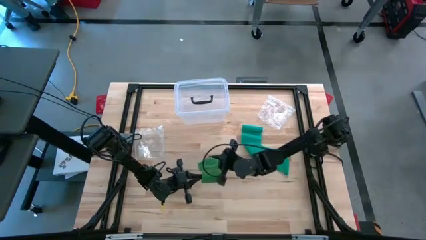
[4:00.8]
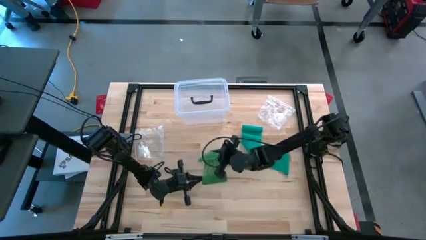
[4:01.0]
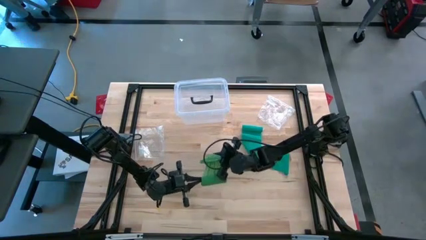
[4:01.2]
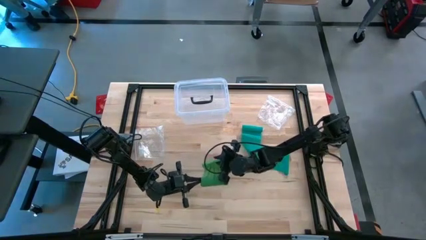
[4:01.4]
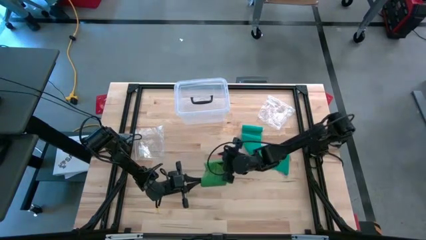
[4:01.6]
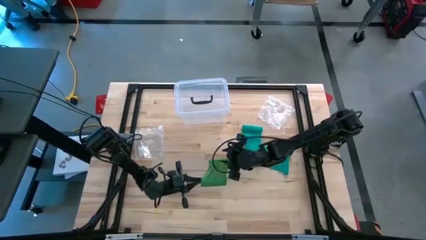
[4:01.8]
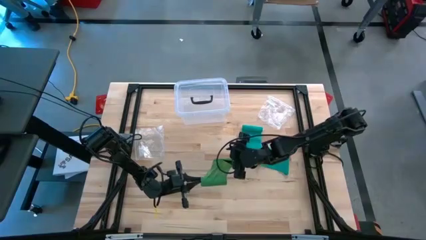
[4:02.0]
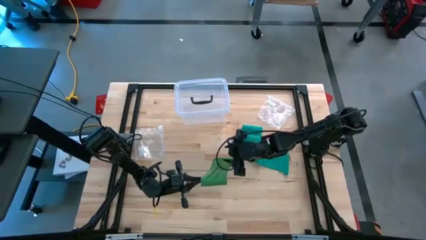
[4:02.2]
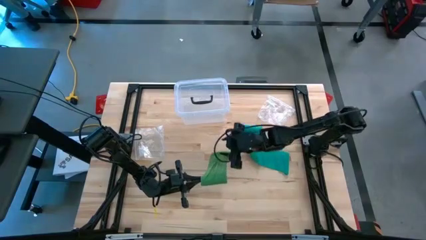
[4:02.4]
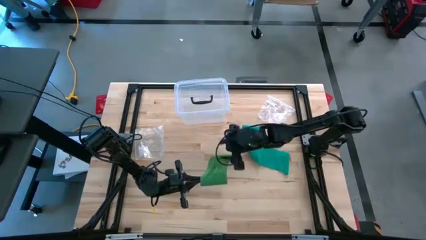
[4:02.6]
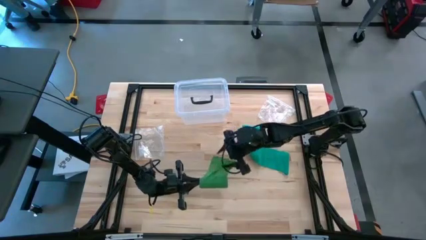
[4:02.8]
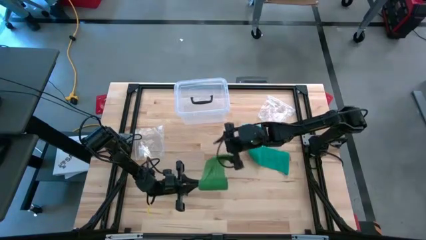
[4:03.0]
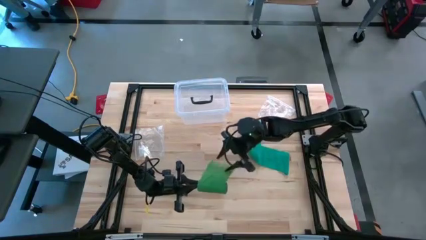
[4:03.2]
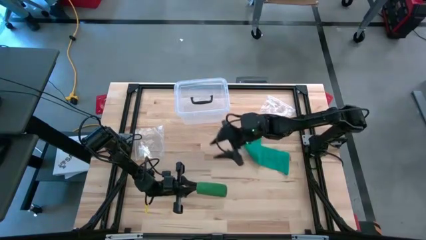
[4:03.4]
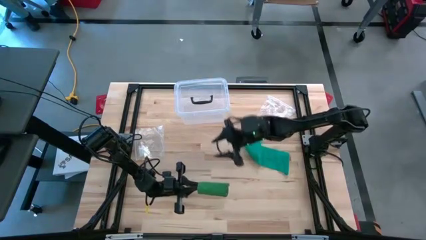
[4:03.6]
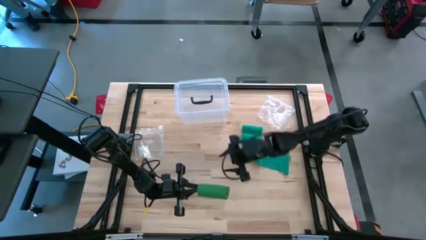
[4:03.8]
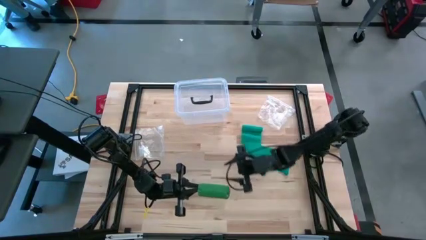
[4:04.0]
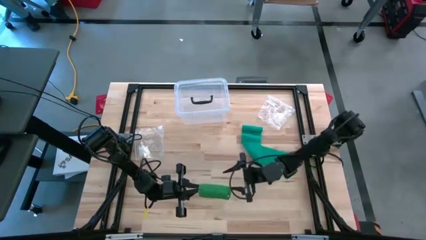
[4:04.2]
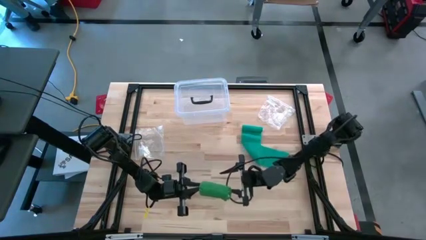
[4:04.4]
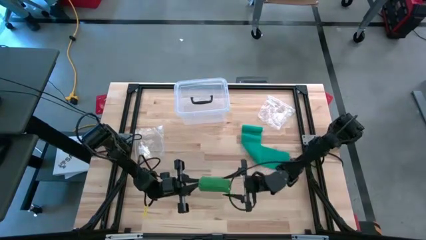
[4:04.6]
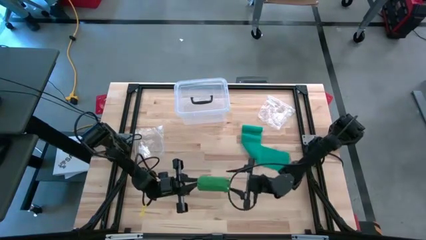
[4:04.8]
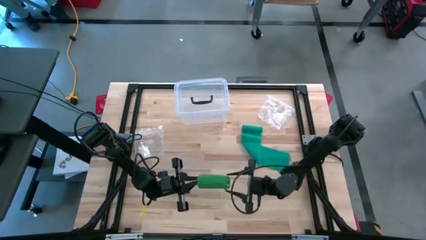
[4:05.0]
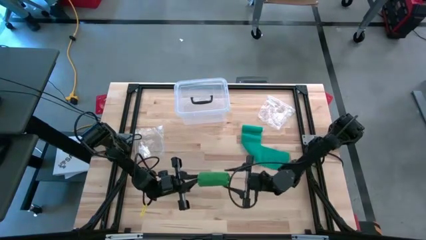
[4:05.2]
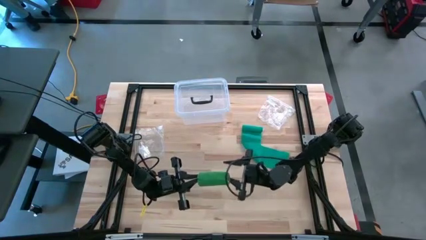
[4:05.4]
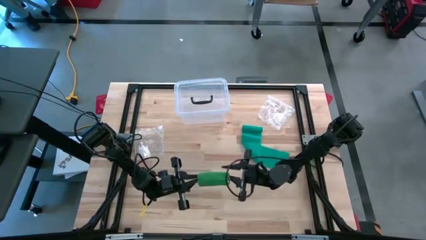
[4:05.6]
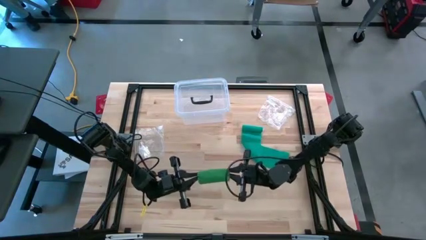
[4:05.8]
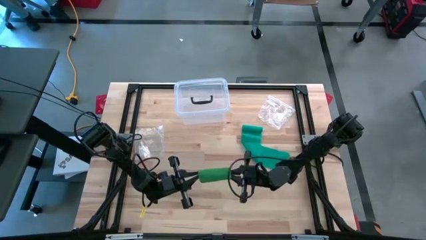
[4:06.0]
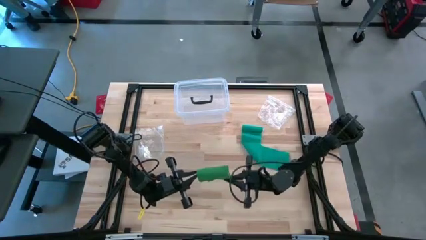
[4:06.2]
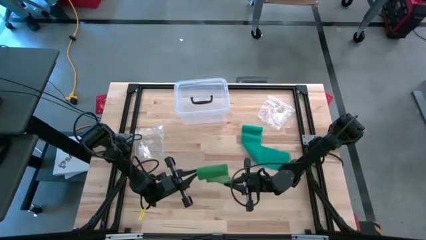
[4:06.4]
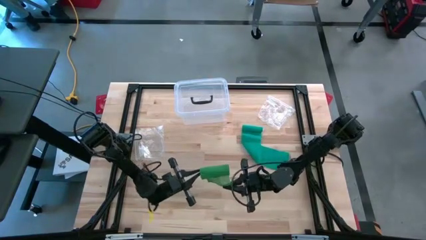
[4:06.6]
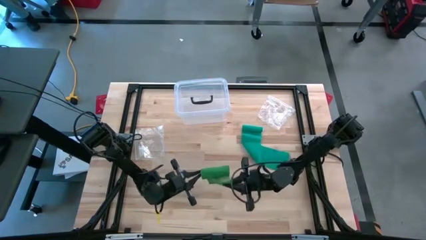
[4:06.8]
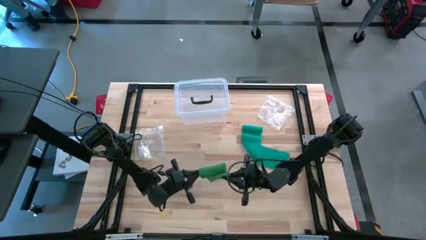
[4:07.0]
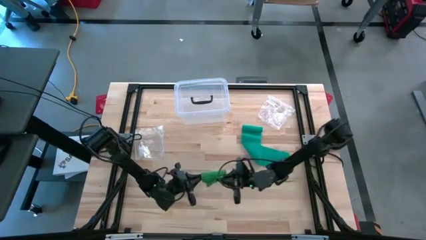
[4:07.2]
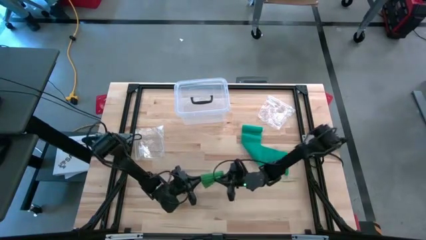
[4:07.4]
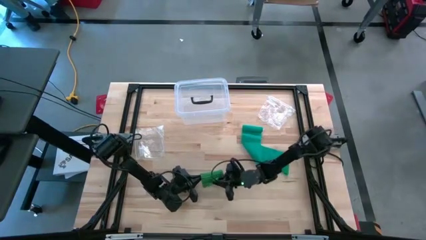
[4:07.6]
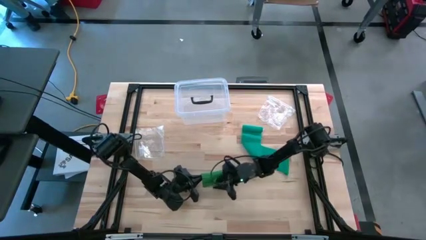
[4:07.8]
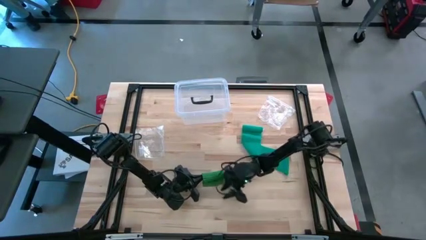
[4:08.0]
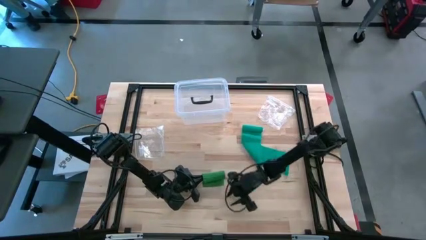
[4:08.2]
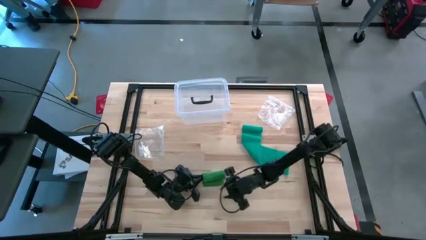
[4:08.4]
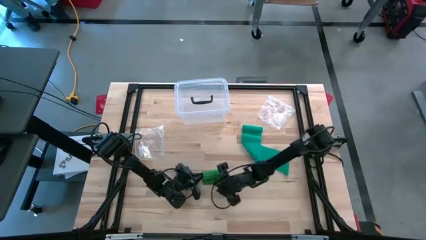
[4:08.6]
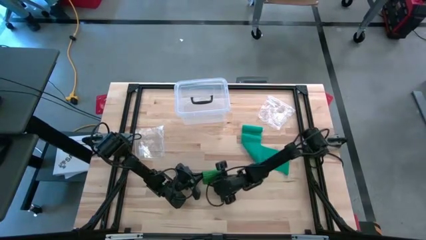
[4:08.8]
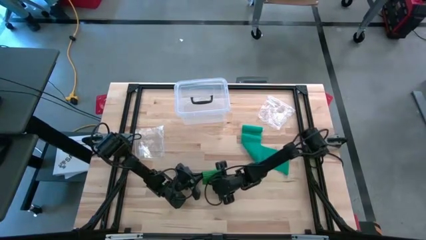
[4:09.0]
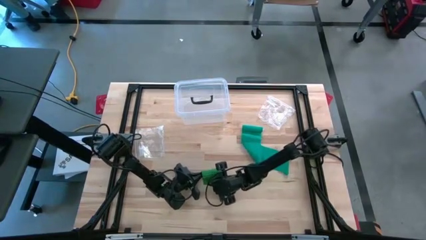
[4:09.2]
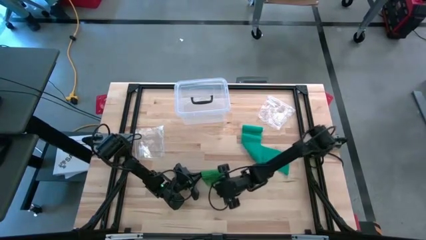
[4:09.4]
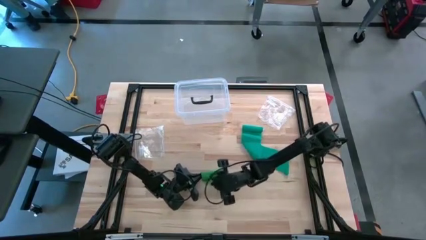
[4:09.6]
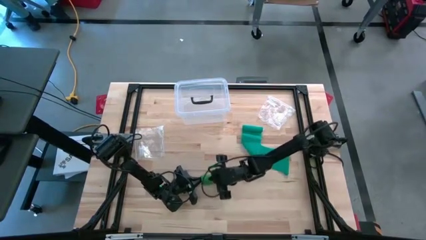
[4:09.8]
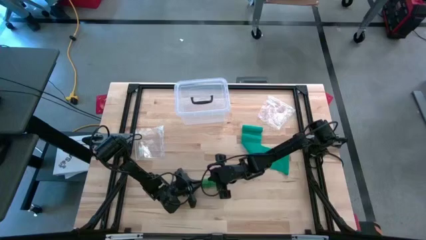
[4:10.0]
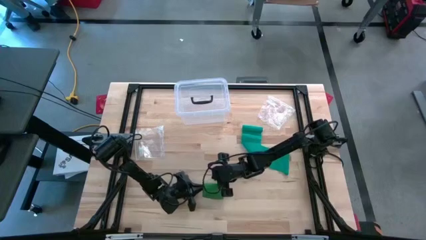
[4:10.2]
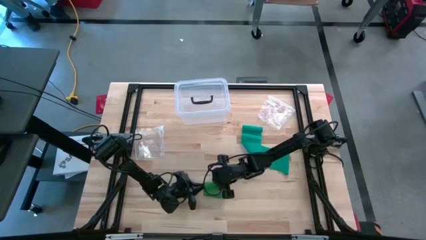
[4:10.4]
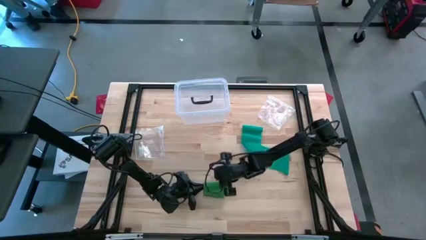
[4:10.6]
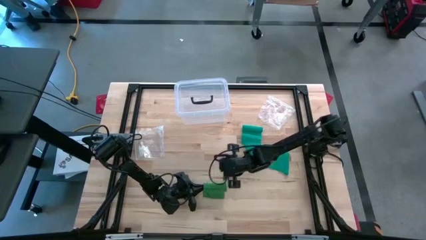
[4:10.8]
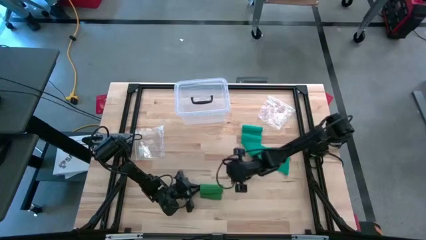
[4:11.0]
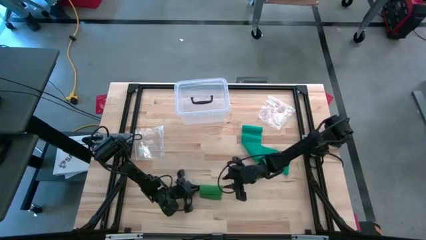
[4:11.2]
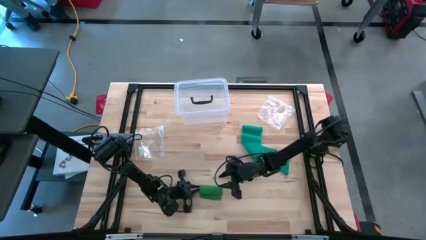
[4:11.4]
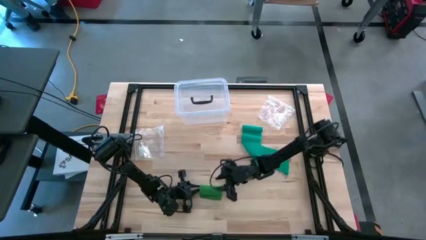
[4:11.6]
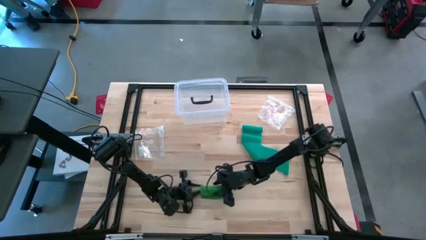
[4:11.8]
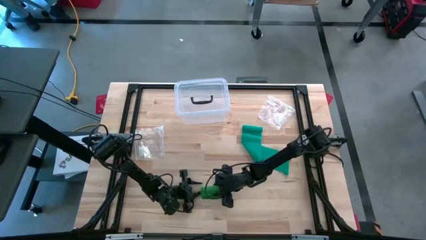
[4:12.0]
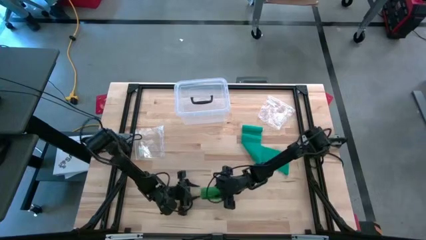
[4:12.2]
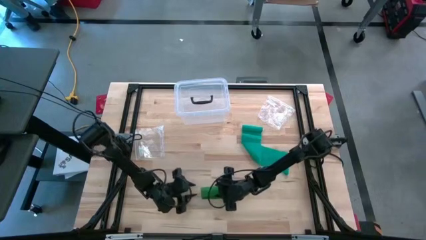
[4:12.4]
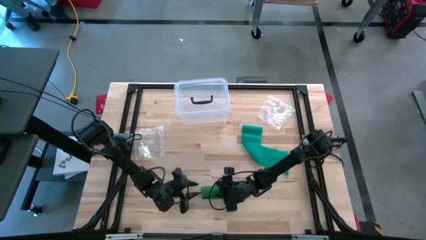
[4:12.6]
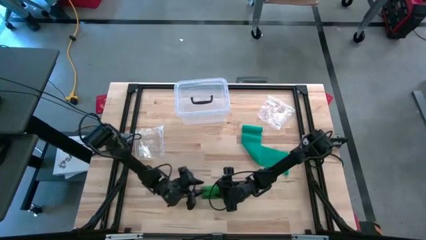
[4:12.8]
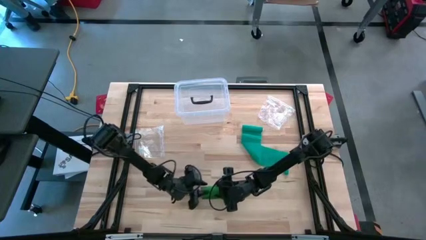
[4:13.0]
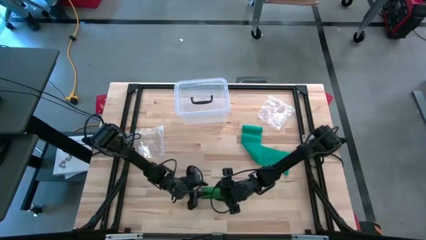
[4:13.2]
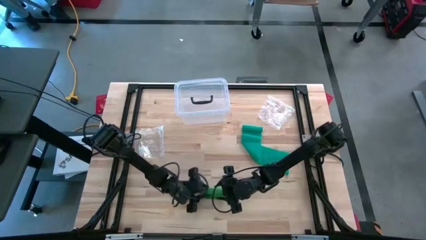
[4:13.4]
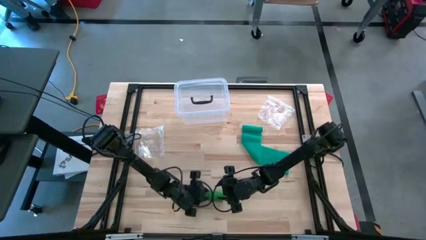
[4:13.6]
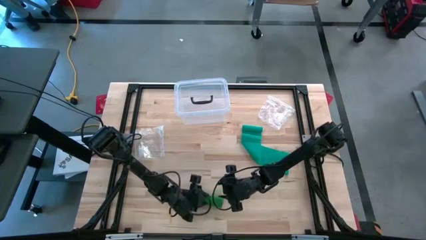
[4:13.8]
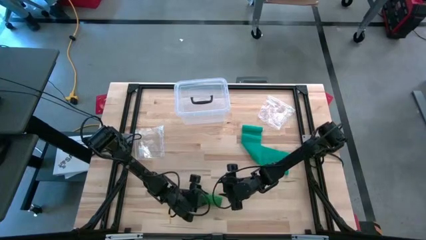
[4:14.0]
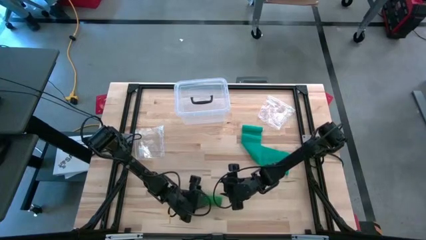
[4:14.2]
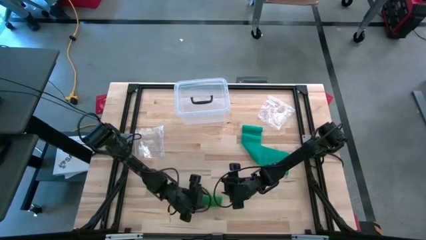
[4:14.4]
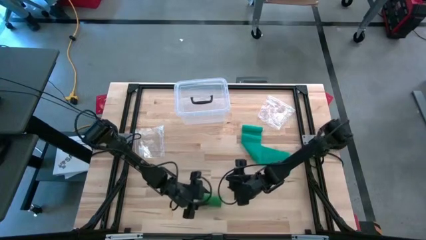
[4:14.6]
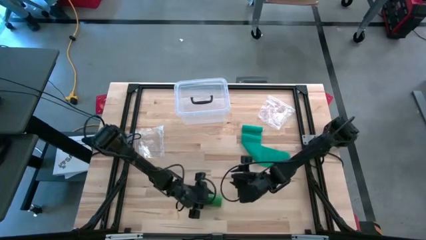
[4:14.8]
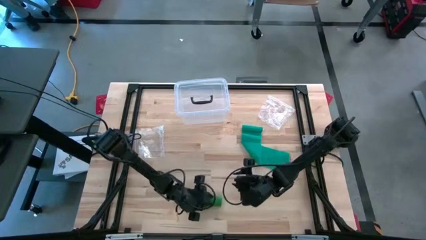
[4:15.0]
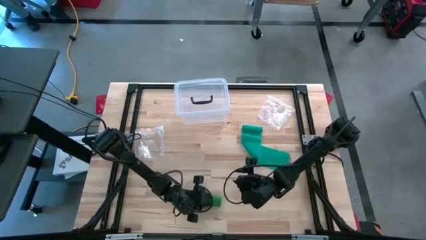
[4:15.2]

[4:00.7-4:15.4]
Task: Roll bandage
Roll the green bandage
